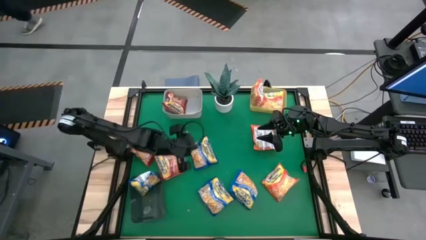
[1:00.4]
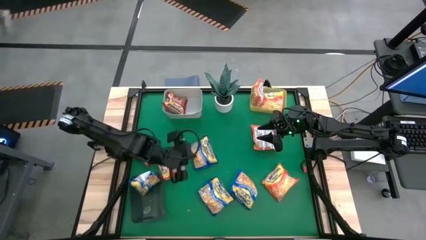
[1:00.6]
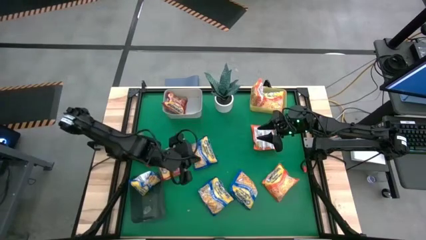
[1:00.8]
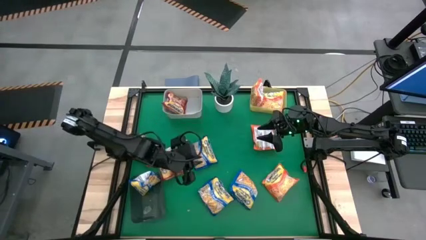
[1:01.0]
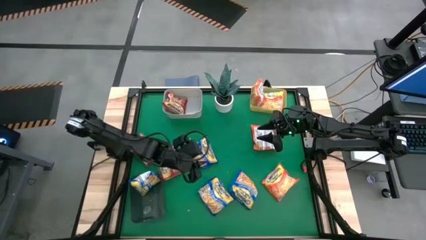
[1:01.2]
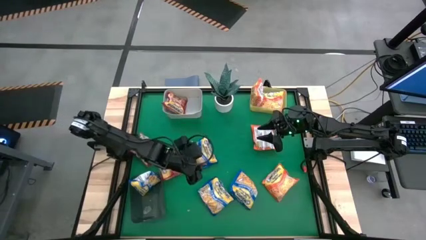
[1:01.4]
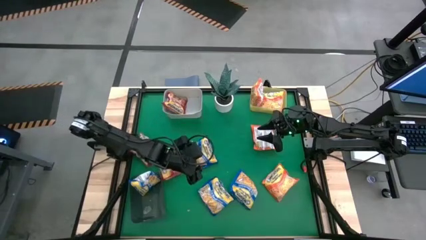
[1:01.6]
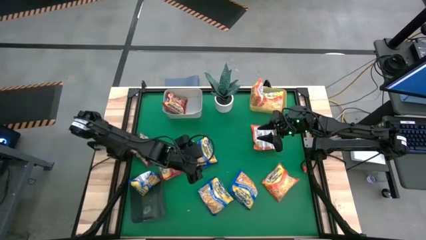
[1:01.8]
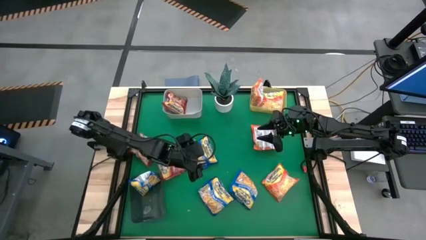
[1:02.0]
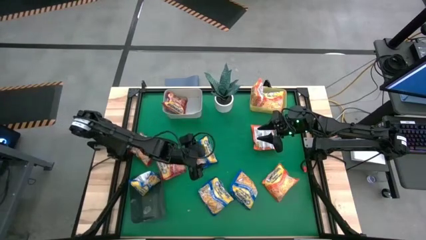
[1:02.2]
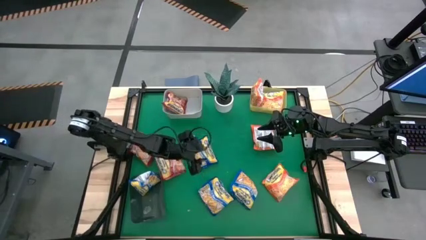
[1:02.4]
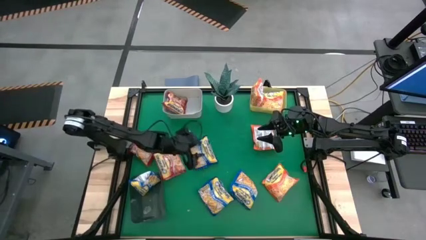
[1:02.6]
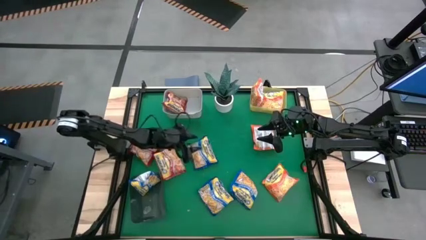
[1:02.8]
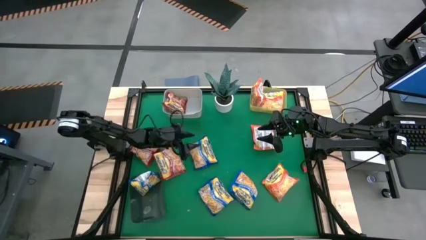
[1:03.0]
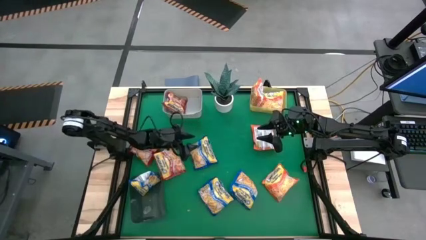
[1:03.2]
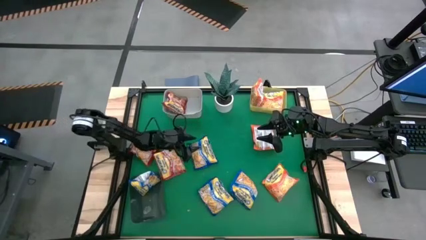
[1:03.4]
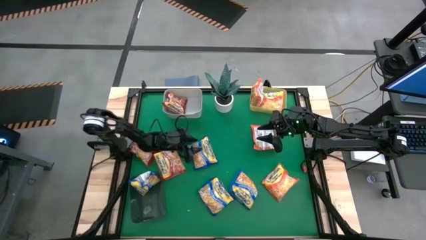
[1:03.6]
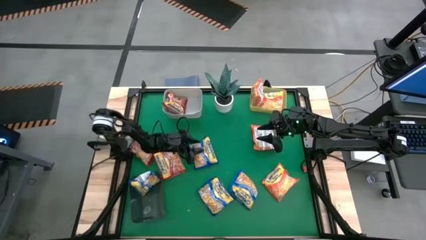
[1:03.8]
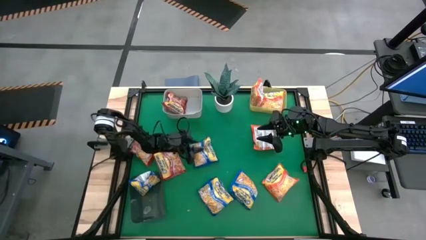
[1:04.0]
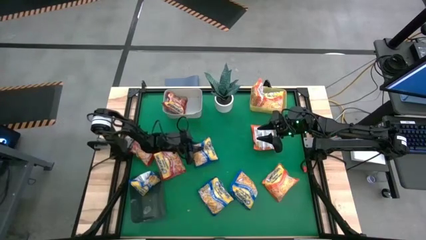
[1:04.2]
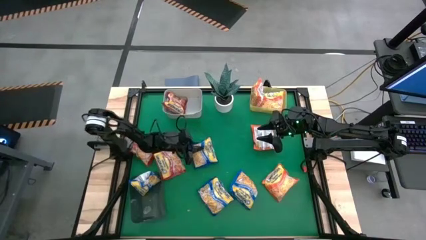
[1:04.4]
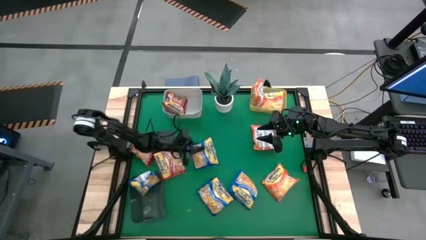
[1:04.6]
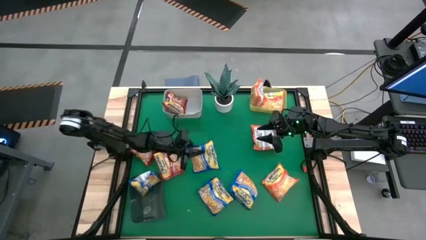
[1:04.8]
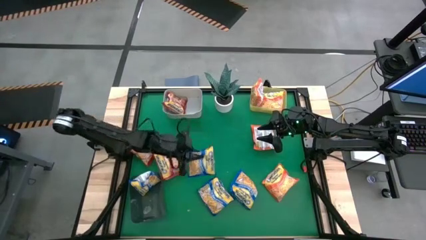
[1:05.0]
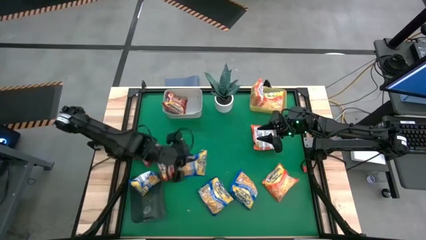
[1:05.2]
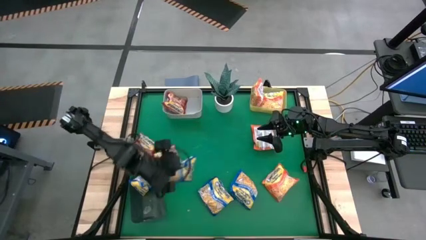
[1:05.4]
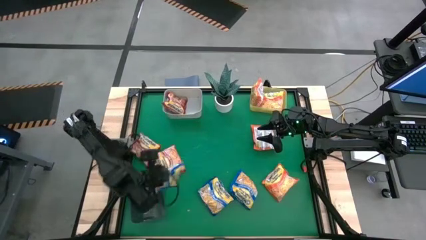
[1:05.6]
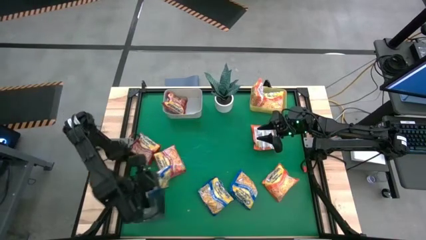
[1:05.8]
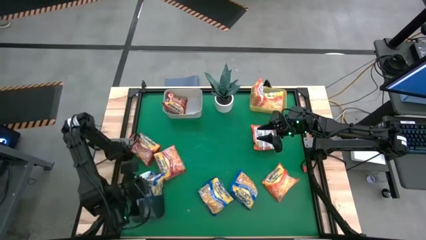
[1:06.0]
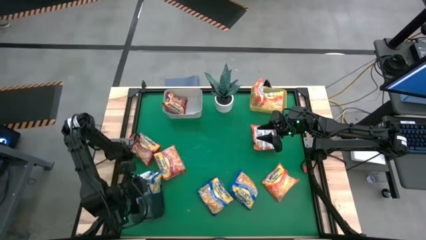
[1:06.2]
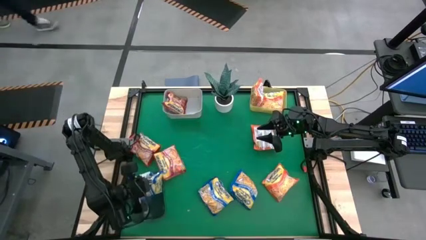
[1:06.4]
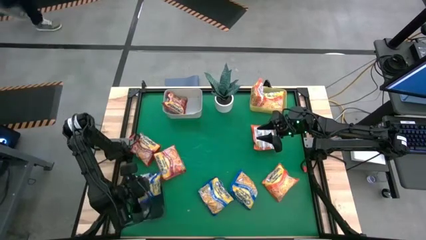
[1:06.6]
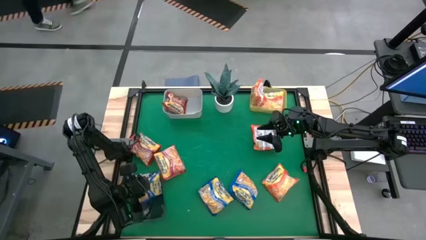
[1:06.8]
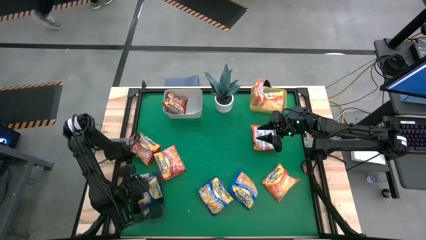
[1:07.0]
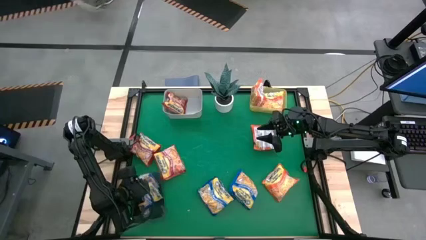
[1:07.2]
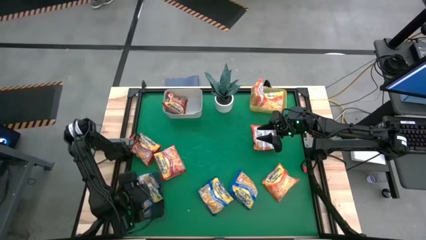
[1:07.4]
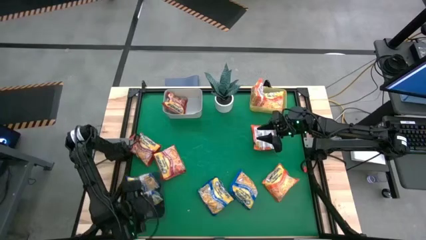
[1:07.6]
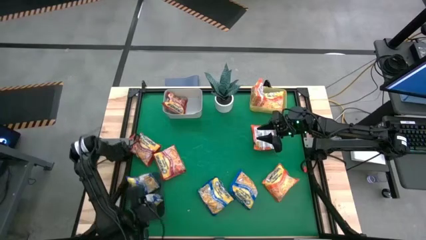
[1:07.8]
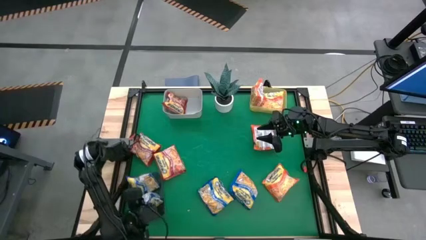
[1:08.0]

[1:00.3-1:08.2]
Task: Sort Maruchan noodles
Put the center blue noodle into the black bin

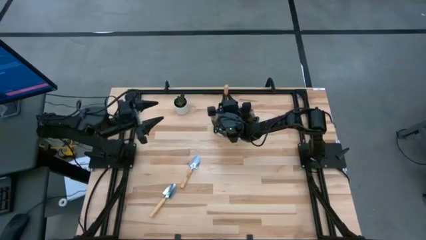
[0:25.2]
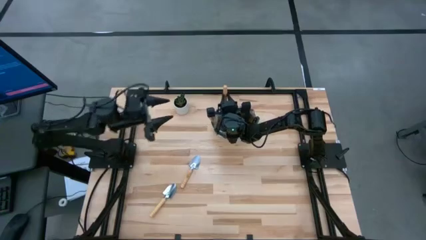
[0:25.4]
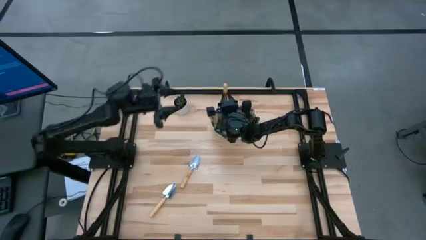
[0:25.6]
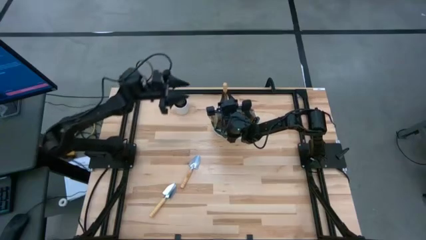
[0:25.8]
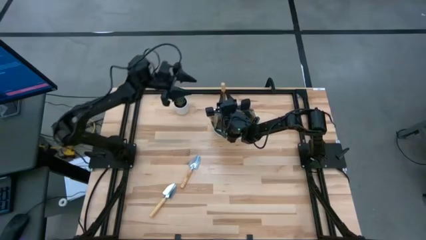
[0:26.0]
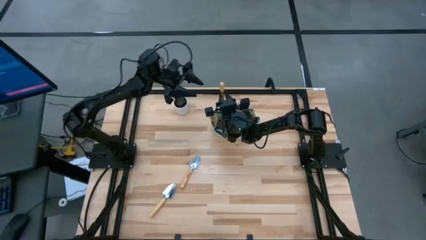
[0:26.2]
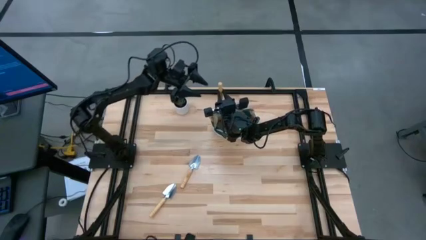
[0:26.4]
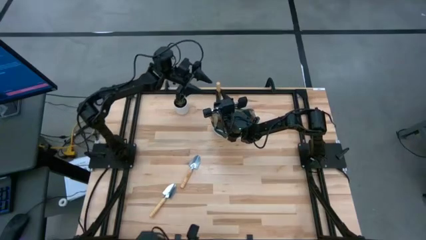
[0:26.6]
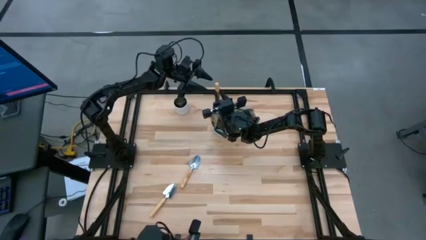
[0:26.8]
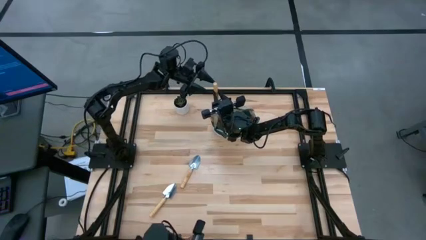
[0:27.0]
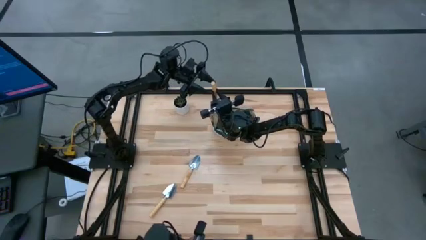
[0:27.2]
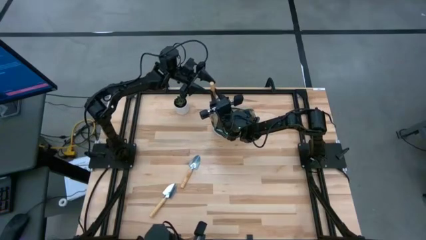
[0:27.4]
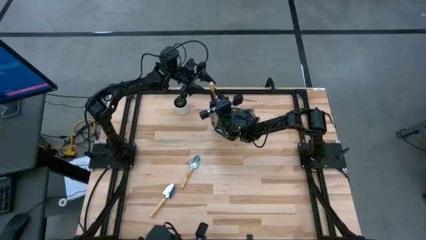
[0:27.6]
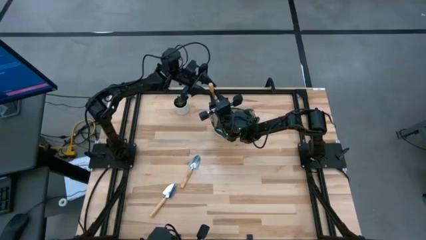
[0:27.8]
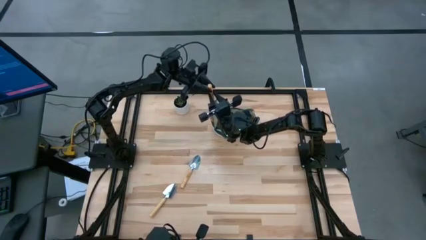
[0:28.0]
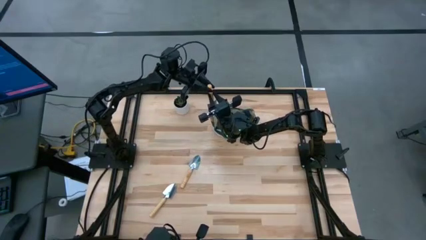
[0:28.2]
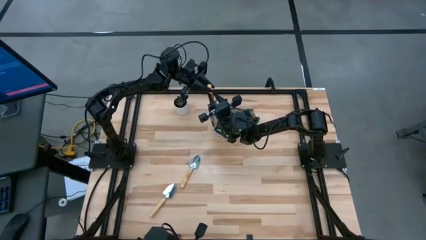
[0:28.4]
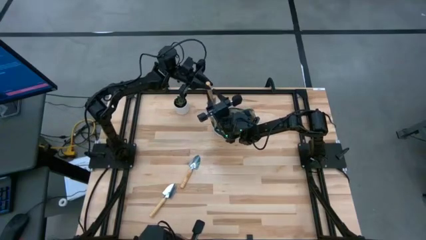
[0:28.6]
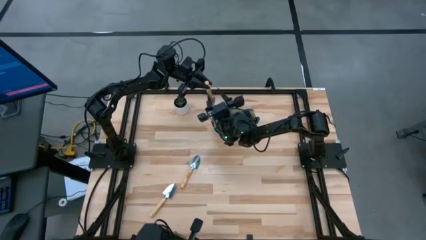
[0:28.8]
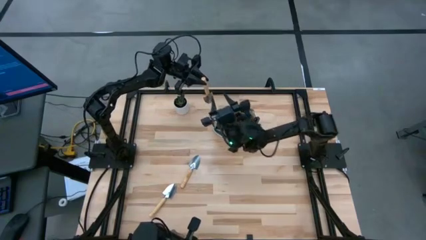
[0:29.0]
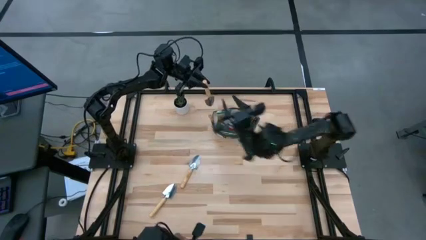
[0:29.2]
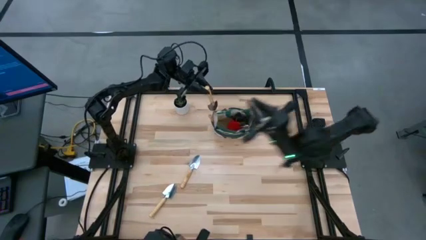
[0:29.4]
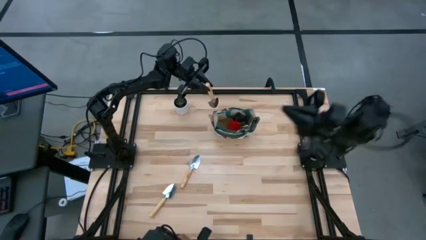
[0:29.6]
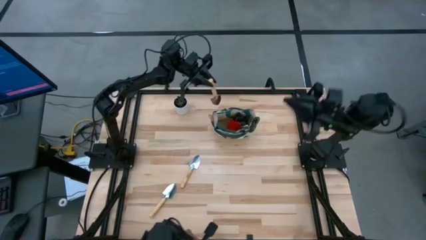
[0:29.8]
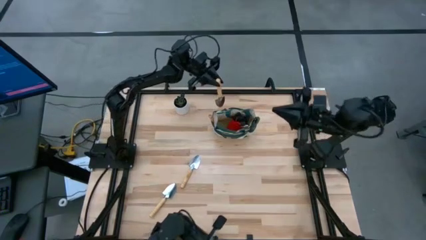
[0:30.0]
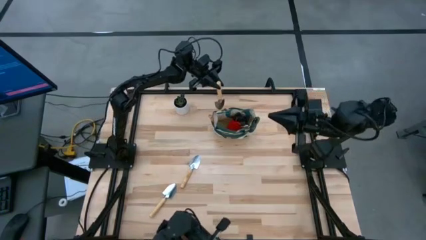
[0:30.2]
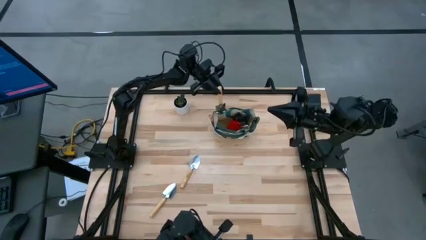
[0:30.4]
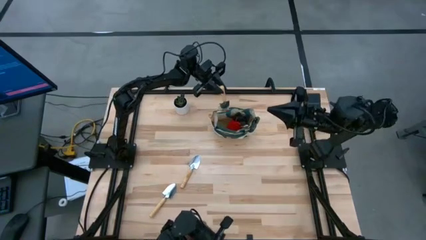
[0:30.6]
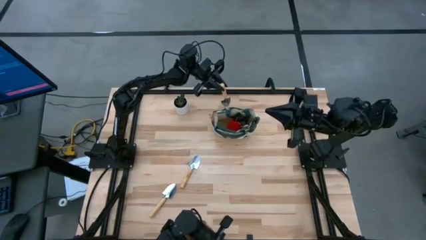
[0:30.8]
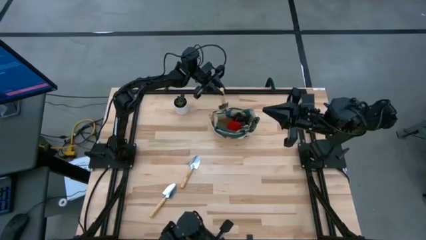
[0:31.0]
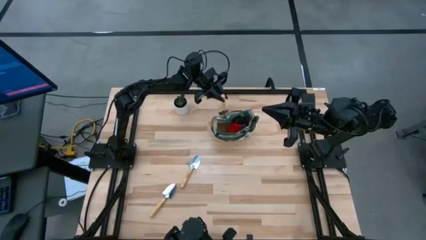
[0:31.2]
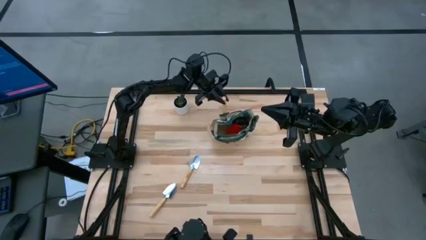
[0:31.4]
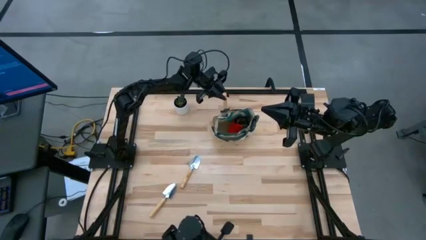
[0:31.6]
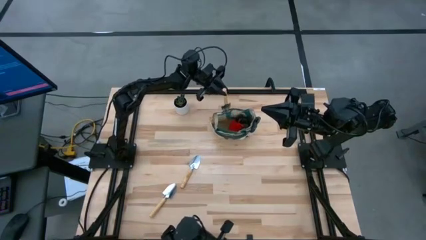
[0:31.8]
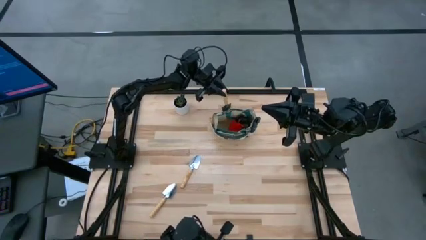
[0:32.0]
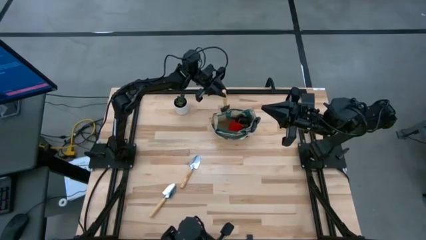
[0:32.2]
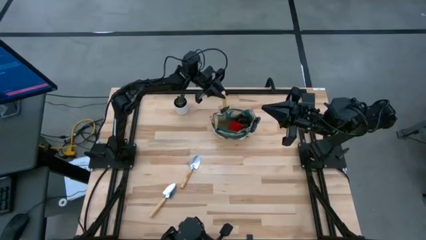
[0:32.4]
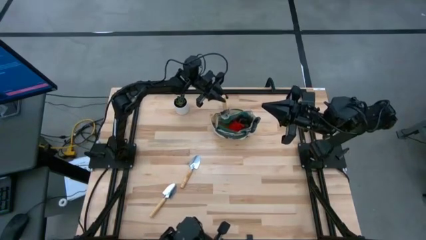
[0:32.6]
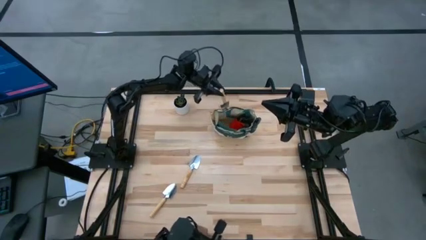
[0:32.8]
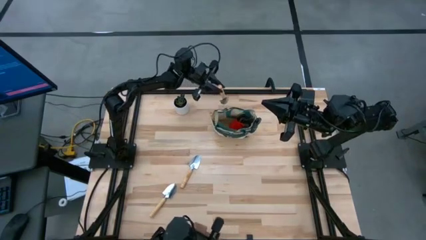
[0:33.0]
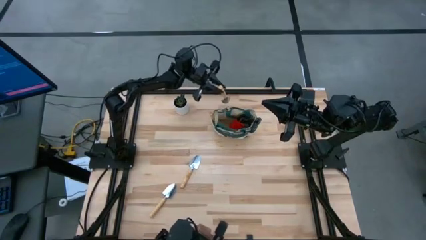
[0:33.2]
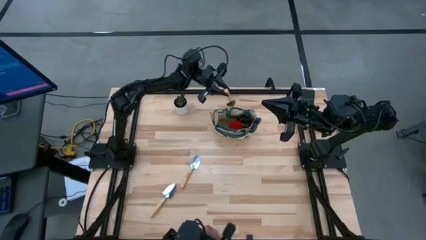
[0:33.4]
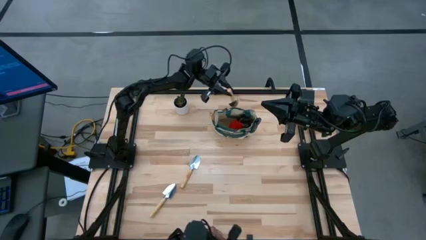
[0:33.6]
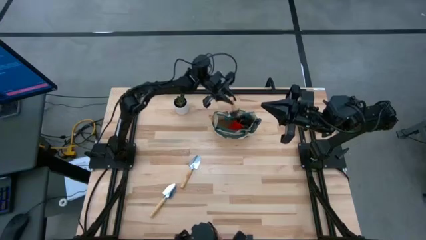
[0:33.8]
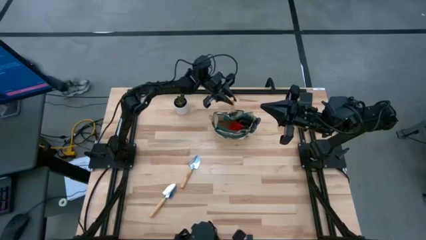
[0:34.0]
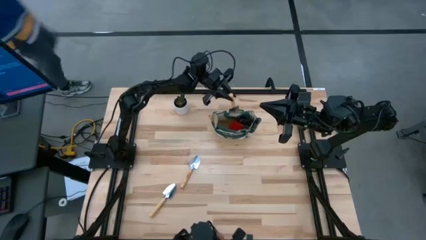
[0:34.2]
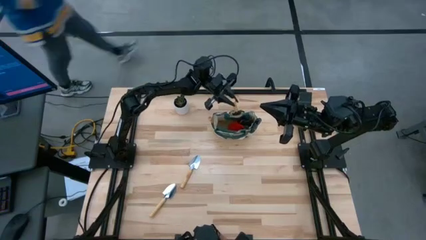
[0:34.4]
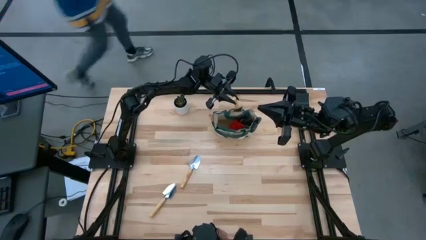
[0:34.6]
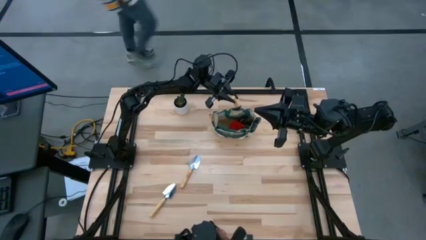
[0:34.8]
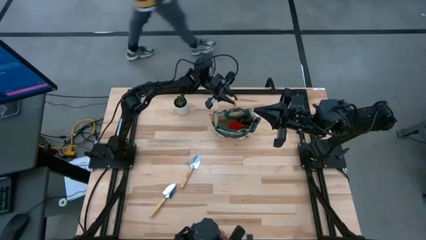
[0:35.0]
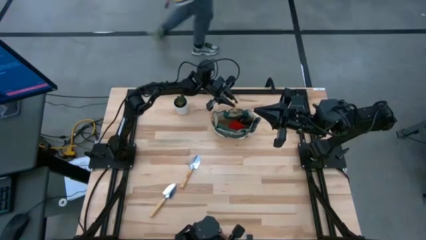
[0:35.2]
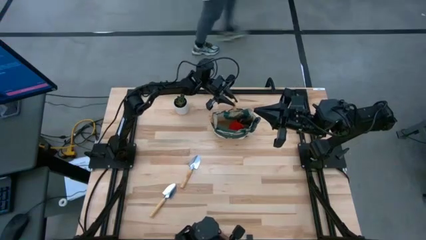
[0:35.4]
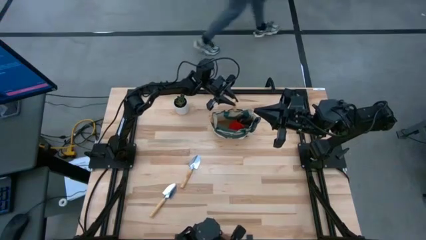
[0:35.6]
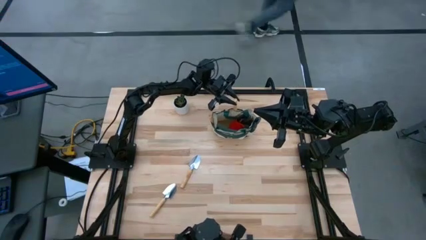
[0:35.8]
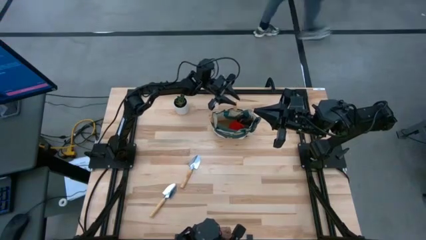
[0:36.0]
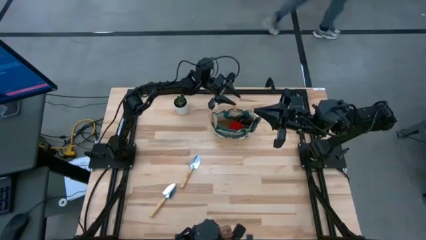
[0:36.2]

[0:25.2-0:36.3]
Task: Pick & Place Garden tools in Gardening bag
Put the brown trowel into the gardening bag
